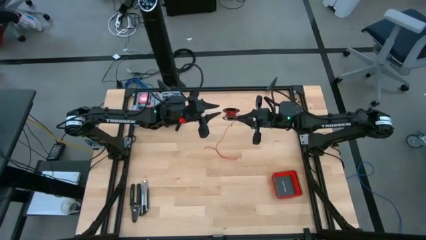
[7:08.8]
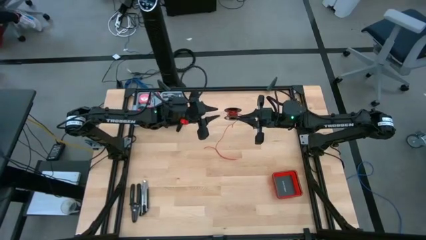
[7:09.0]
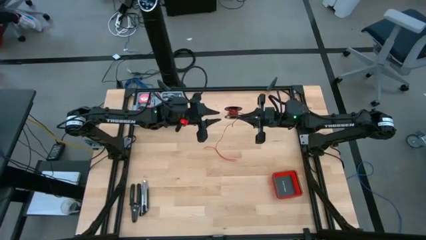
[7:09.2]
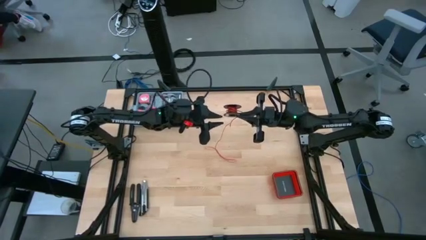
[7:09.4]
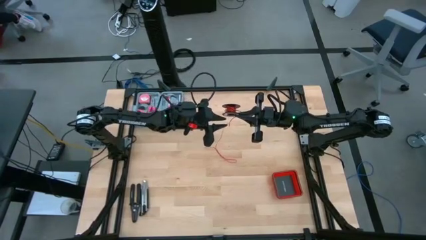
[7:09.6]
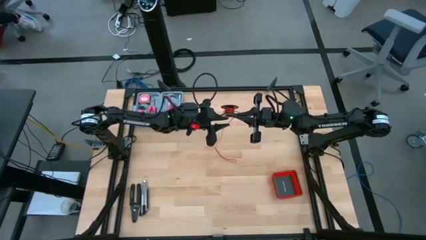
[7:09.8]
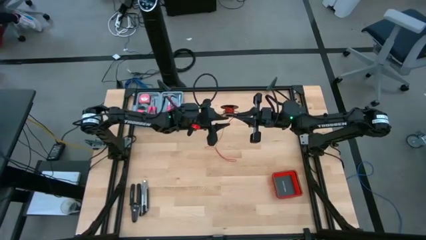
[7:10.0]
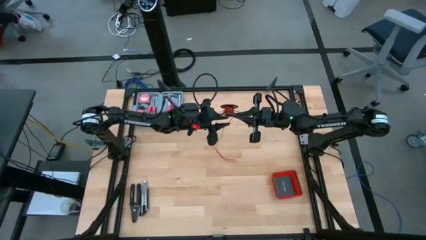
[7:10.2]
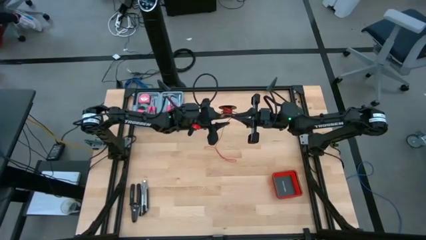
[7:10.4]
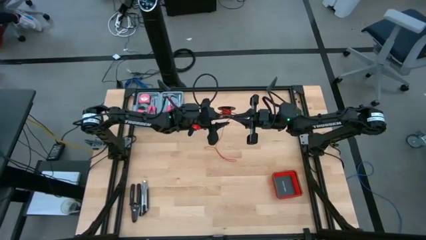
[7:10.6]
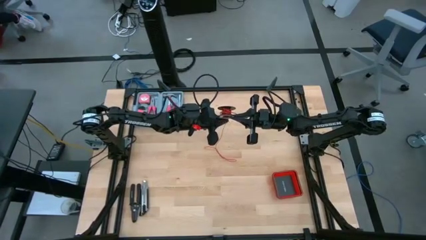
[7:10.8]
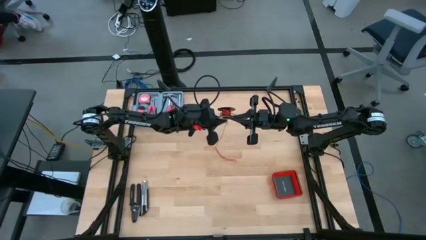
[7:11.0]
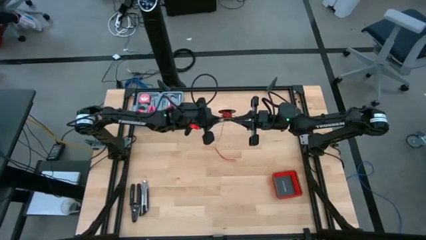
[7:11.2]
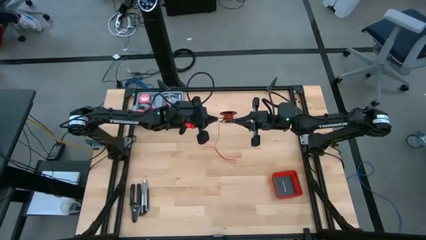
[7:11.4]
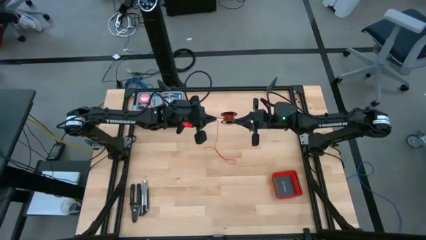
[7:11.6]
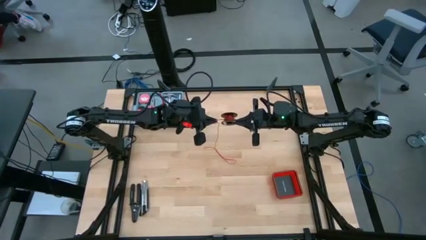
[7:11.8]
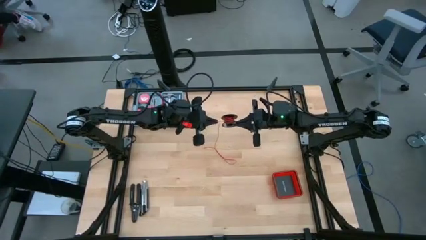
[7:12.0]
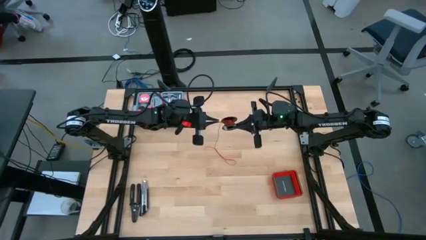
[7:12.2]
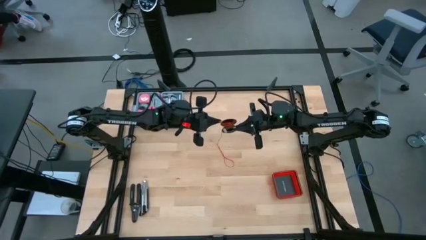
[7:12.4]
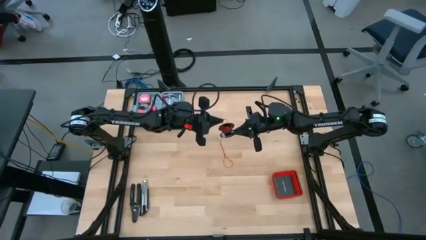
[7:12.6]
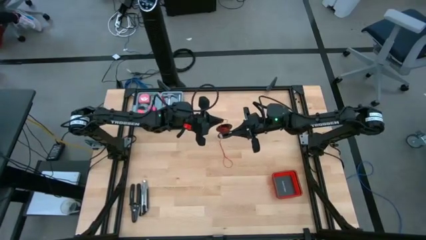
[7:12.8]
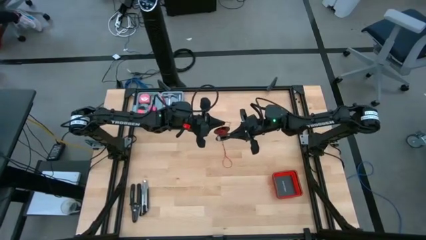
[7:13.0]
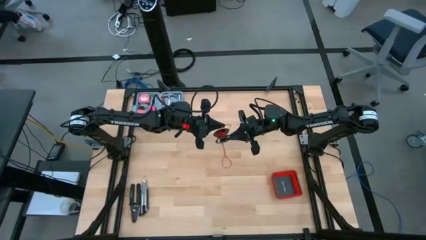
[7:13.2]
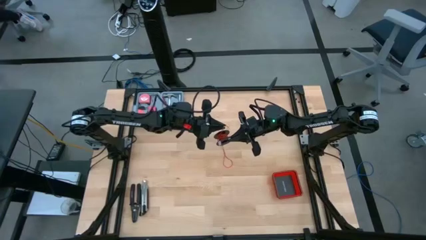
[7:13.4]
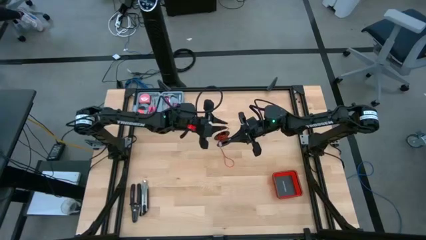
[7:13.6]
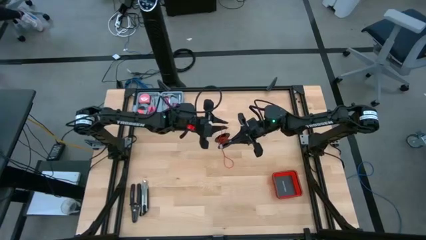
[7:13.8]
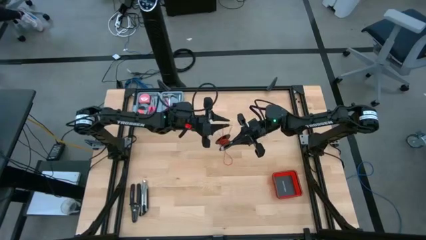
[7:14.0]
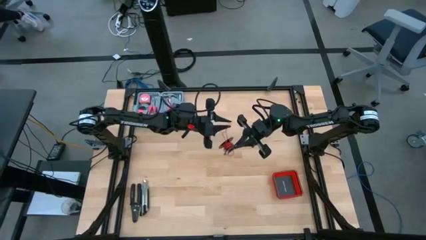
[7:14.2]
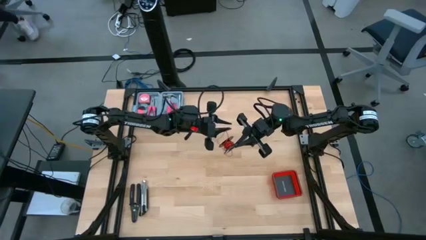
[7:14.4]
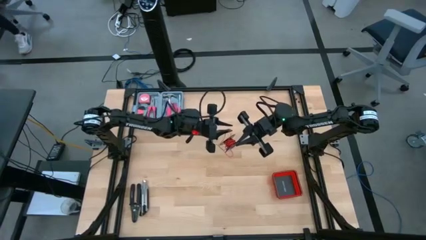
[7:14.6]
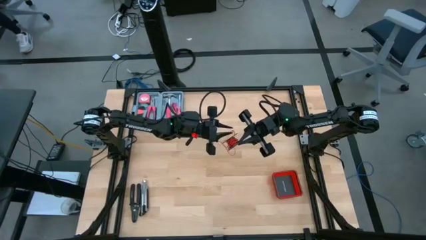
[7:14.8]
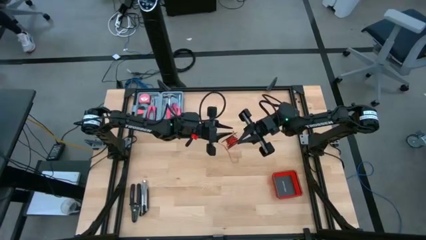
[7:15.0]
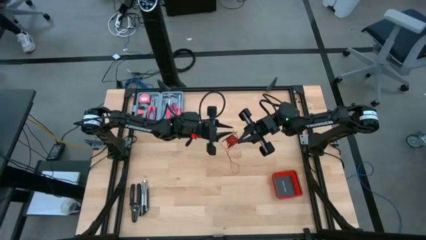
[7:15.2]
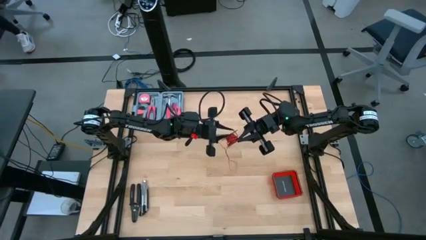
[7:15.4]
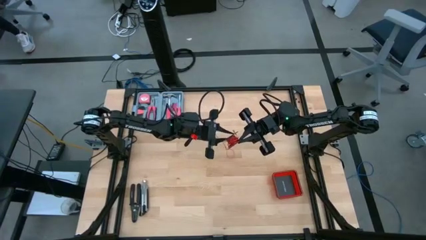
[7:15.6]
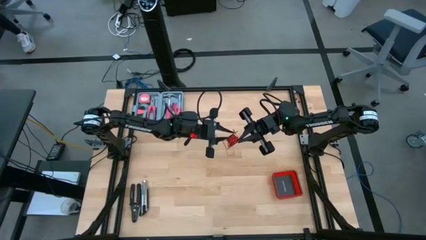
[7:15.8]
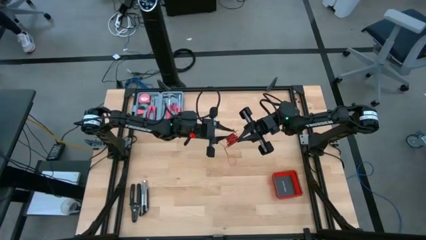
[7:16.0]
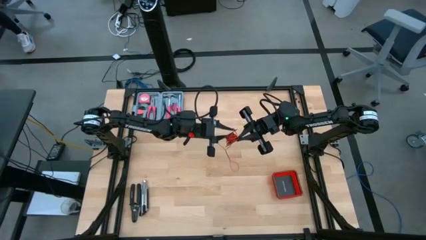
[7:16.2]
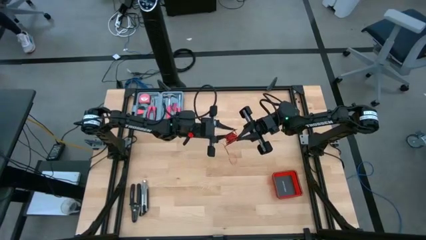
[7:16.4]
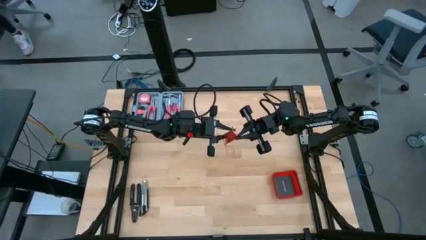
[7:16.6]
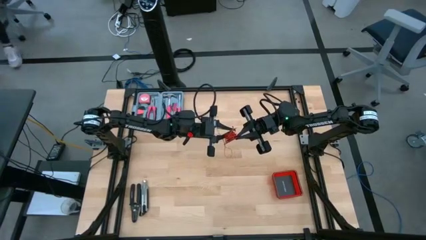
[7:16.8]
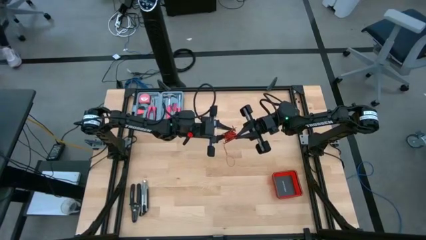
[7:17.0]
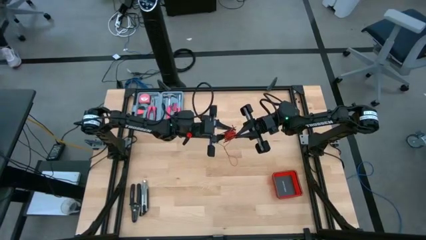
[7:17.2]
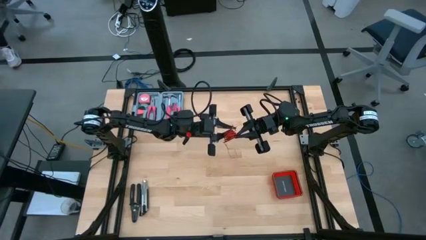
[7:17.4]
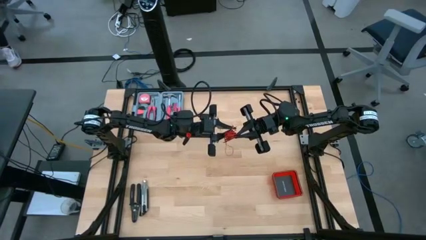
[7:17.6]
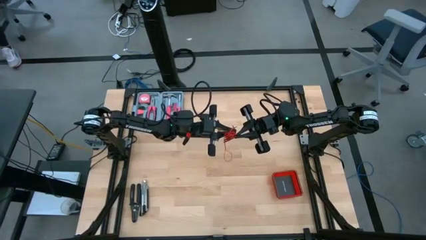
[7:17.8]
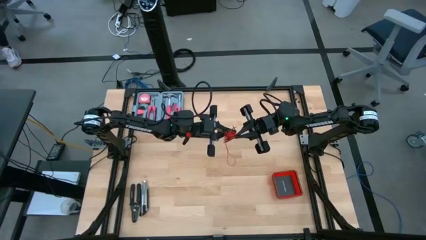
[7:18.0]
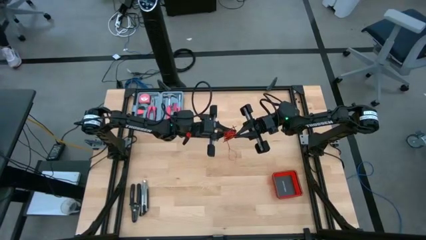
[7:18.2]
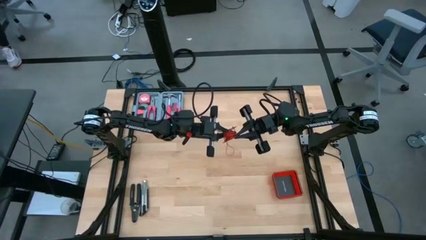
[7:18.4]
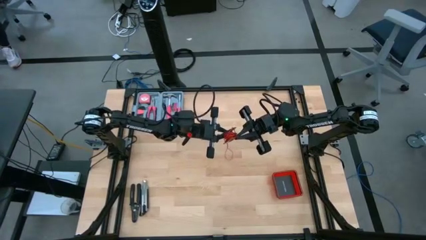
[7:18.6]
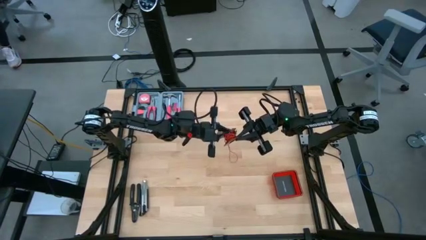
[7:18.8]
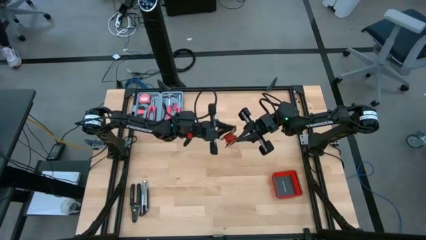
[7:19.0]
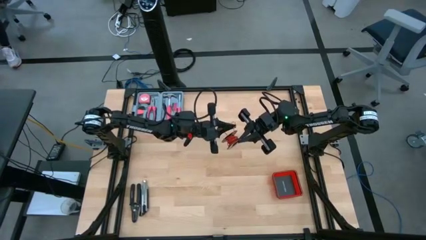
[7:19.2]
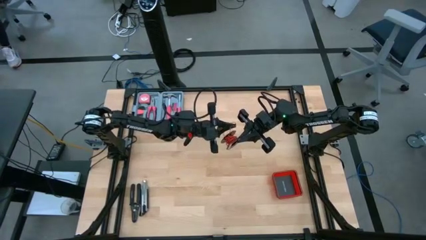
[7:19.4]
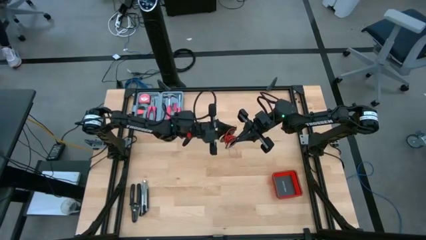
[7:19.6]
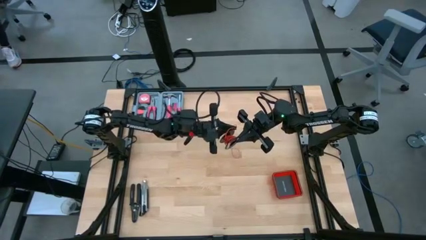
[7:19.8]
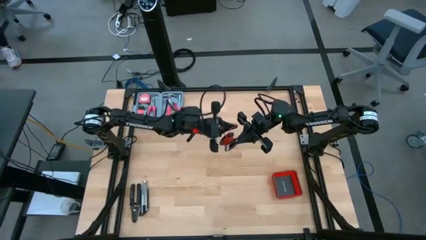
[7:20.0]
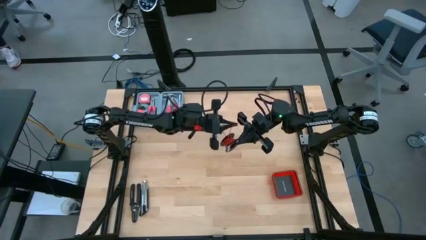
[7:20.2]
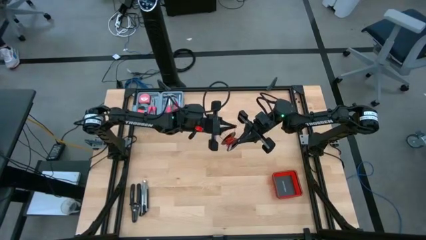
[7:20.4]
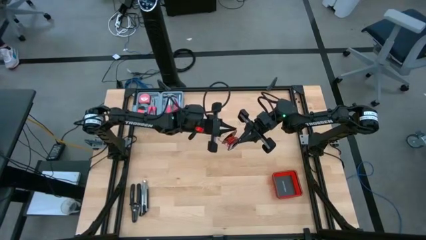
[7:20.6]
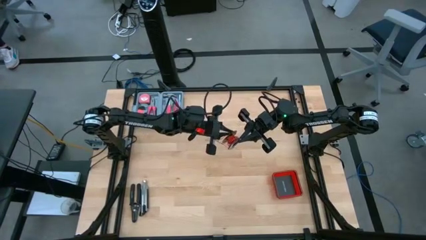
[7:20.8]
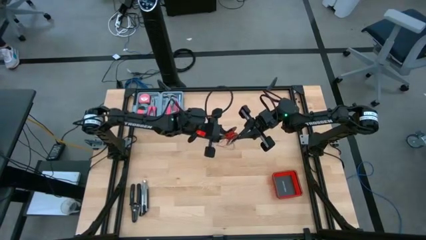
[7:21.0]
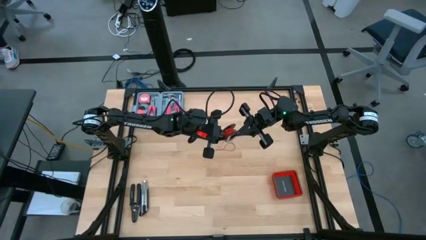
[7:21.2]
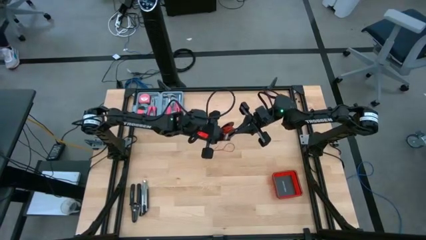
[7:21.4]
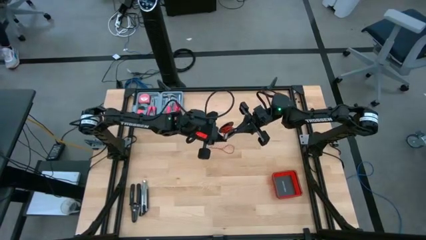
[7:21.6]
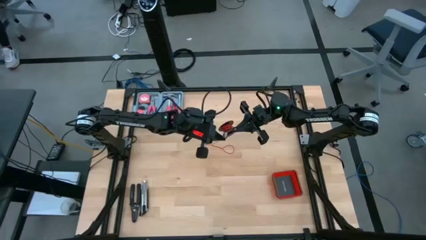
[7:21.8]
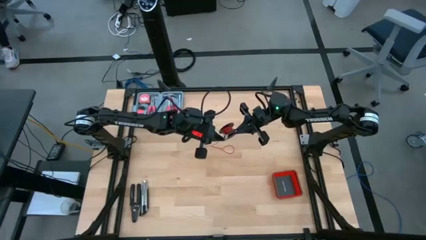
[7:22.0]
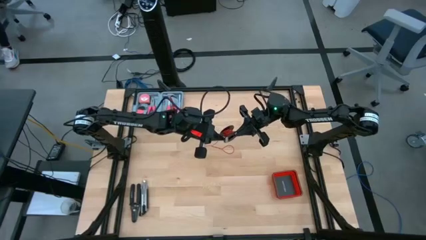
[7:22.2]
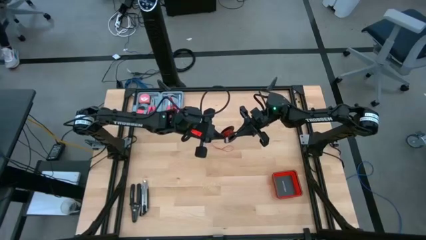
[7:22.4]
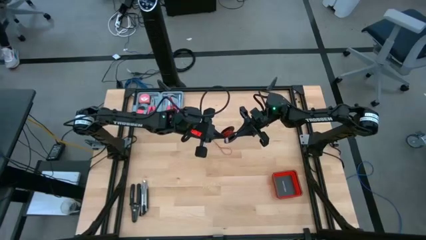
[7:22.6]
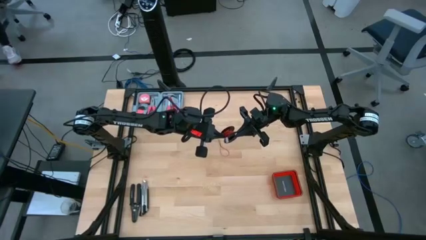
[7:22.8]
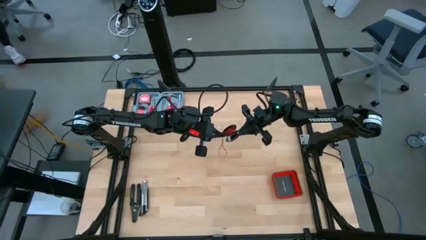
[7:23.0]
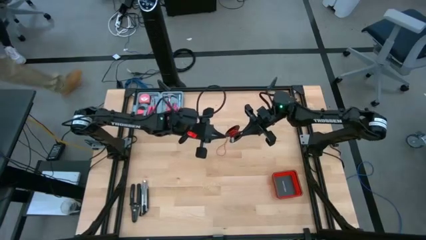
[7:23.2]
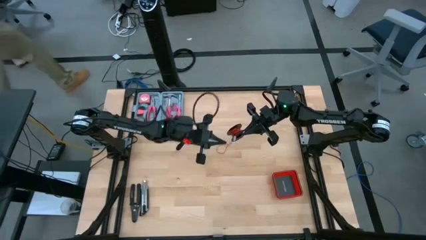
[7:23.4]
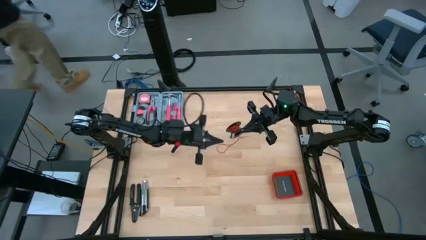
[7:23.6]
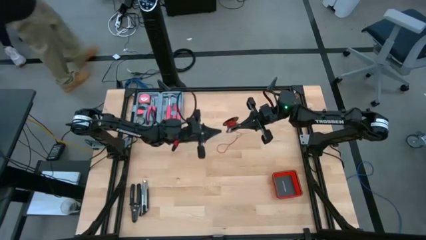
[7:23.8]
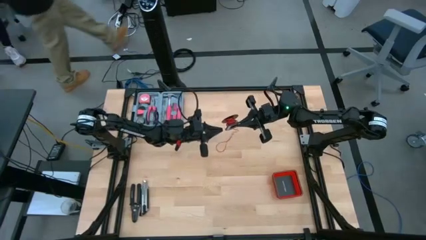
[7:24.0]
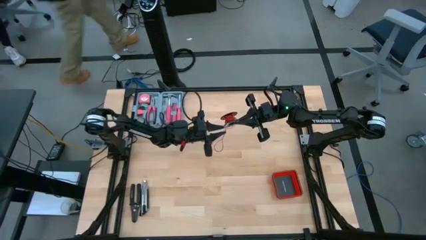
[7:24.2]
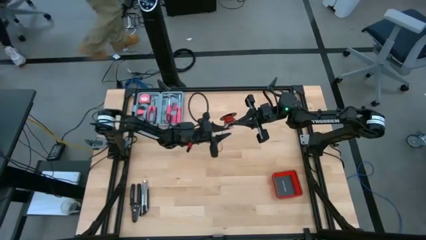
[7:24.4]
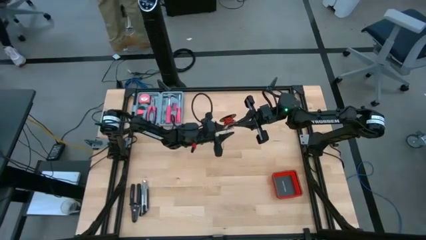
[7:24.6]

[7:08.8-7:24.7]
Task: Coil cords
Coil the red wire onto the spool
